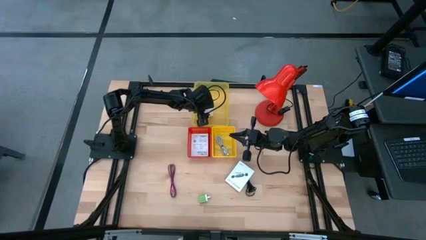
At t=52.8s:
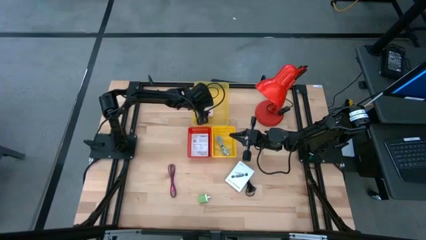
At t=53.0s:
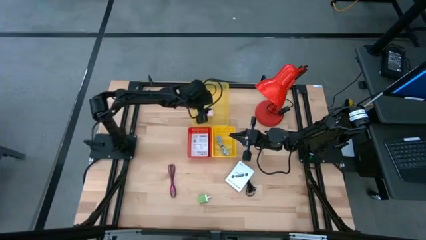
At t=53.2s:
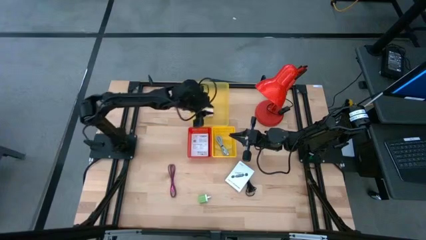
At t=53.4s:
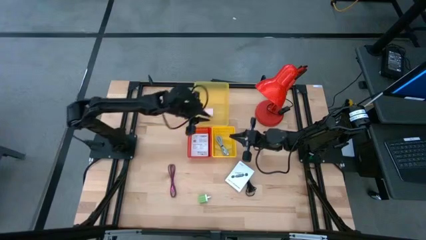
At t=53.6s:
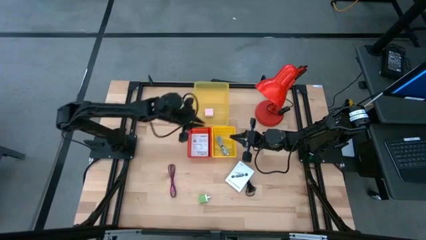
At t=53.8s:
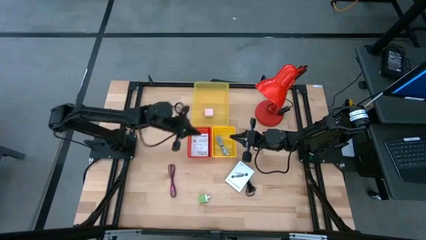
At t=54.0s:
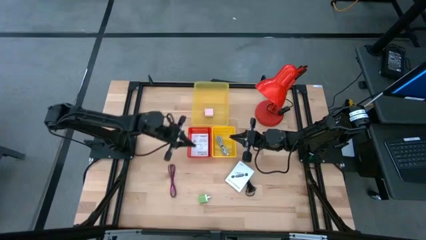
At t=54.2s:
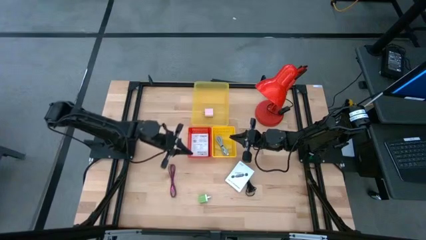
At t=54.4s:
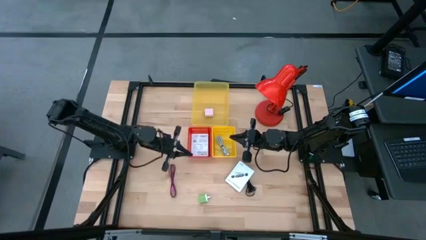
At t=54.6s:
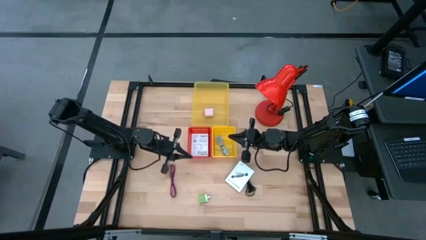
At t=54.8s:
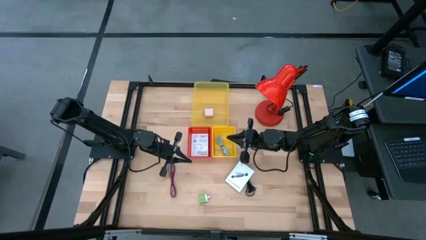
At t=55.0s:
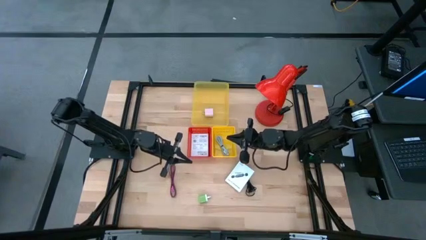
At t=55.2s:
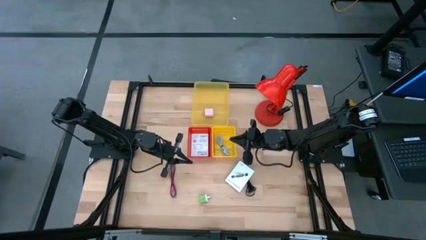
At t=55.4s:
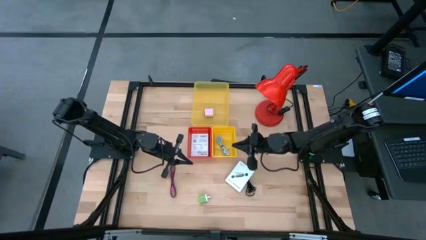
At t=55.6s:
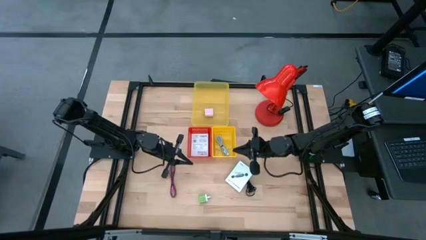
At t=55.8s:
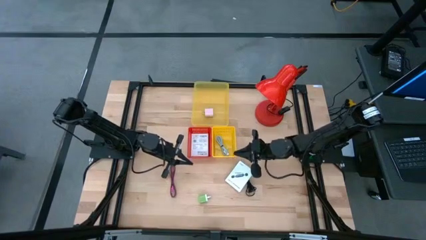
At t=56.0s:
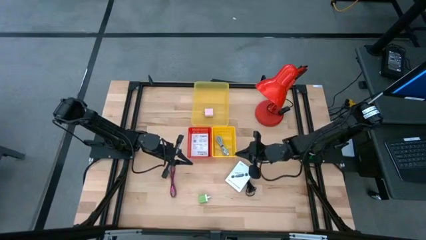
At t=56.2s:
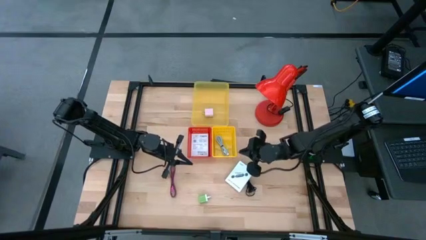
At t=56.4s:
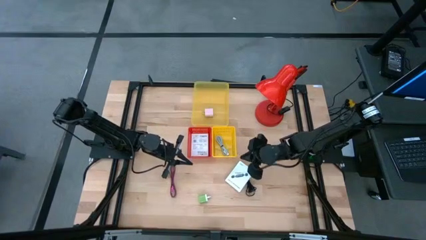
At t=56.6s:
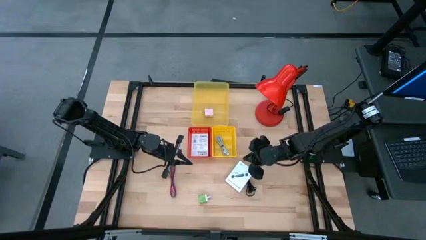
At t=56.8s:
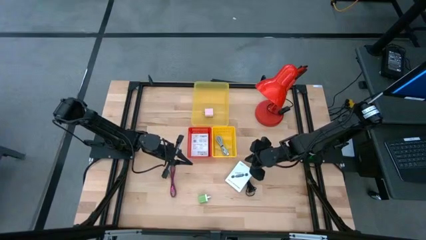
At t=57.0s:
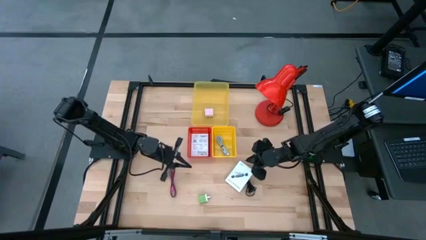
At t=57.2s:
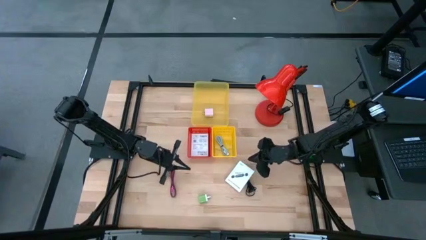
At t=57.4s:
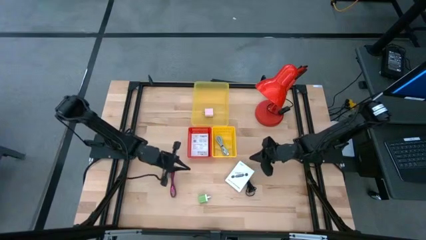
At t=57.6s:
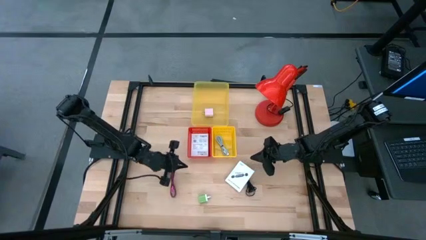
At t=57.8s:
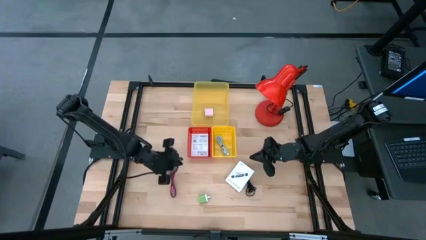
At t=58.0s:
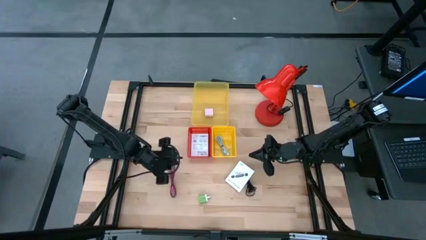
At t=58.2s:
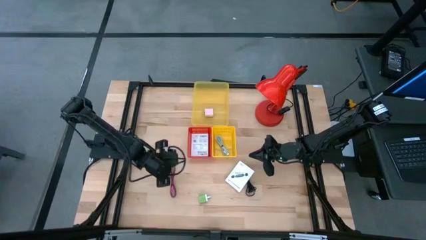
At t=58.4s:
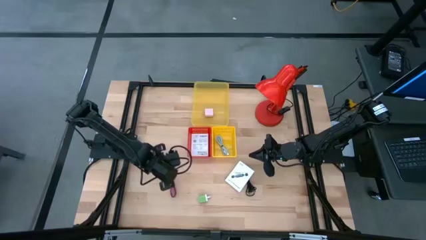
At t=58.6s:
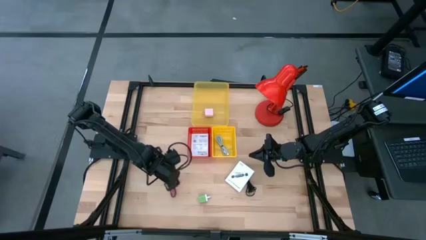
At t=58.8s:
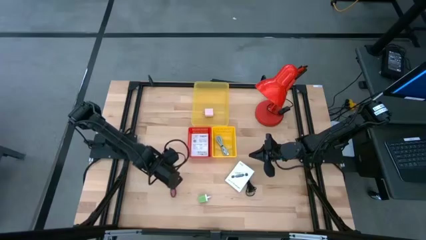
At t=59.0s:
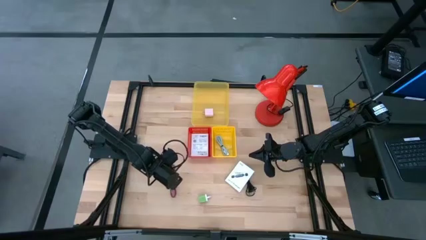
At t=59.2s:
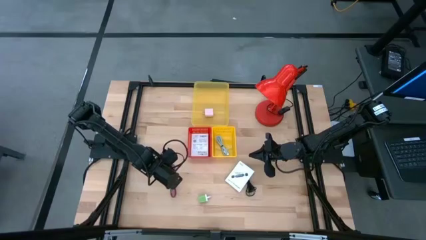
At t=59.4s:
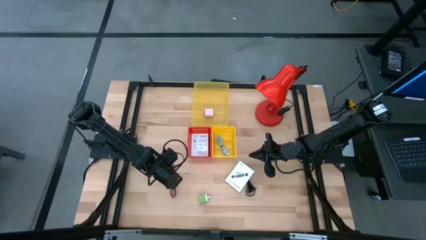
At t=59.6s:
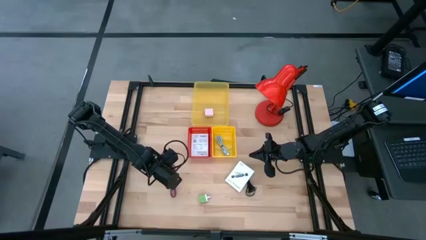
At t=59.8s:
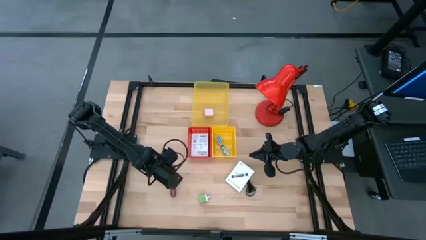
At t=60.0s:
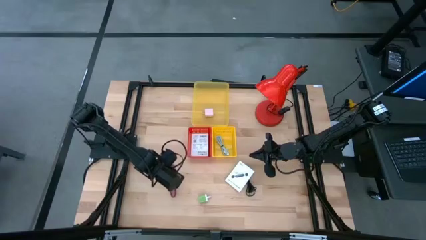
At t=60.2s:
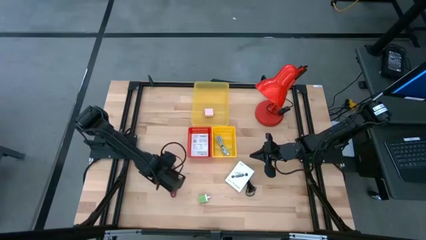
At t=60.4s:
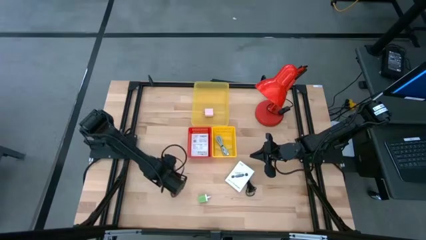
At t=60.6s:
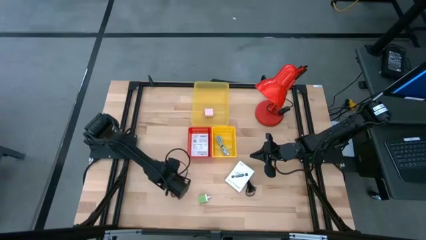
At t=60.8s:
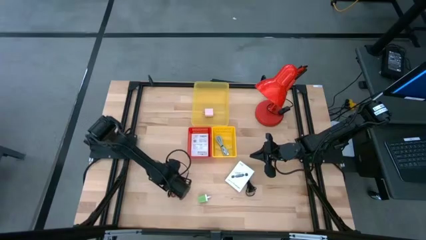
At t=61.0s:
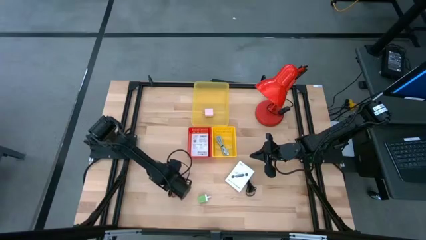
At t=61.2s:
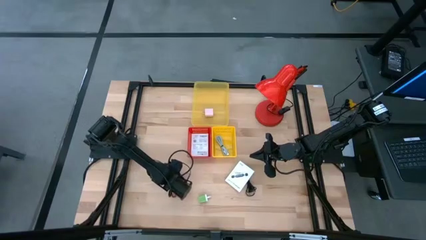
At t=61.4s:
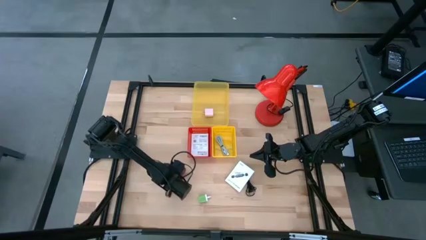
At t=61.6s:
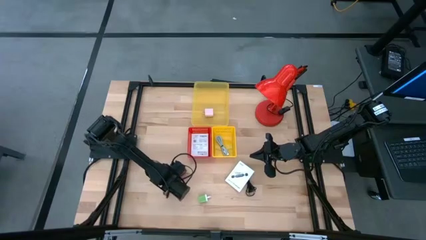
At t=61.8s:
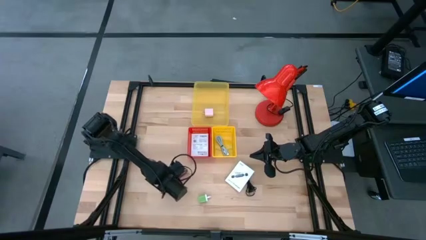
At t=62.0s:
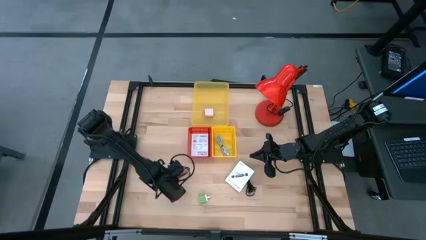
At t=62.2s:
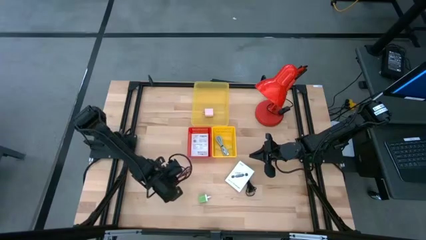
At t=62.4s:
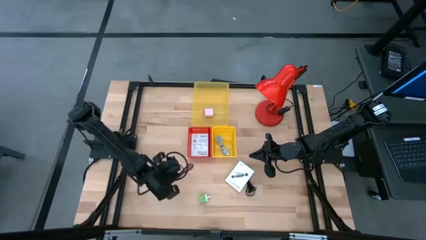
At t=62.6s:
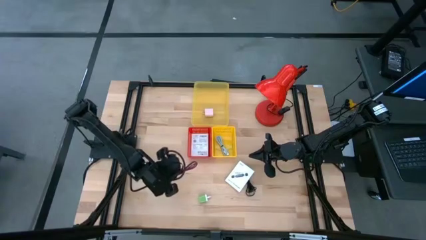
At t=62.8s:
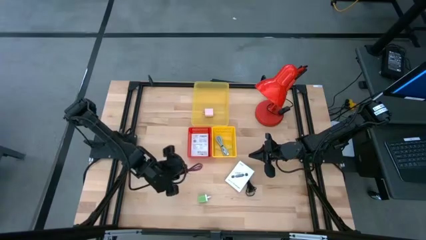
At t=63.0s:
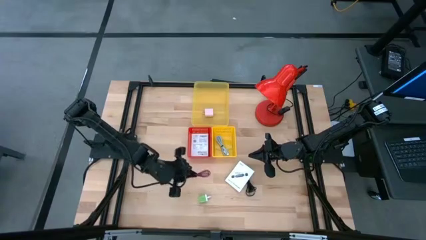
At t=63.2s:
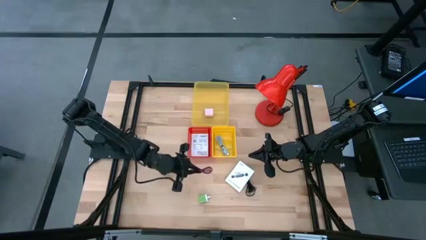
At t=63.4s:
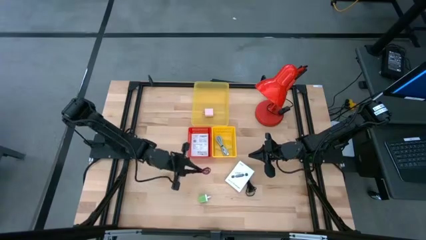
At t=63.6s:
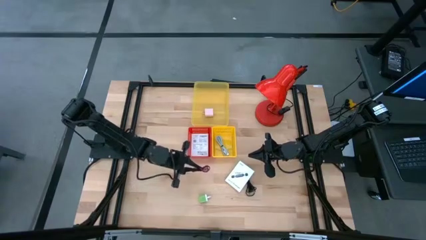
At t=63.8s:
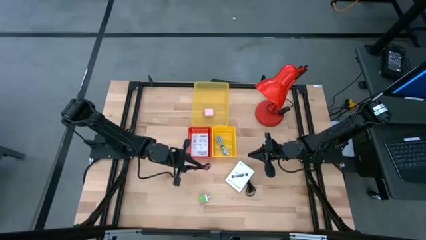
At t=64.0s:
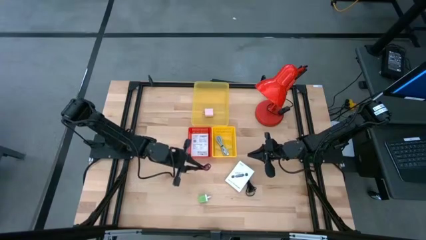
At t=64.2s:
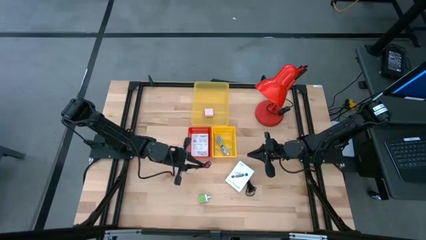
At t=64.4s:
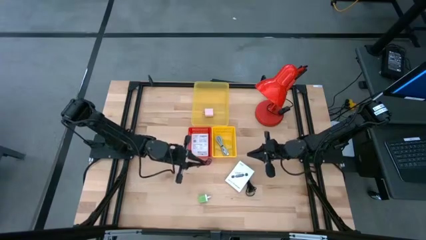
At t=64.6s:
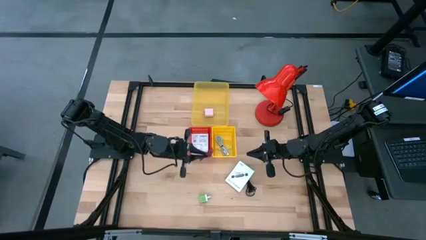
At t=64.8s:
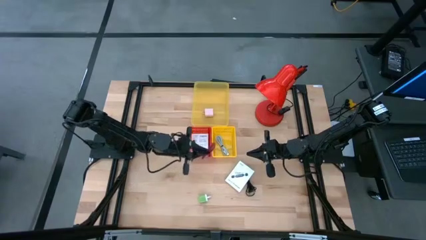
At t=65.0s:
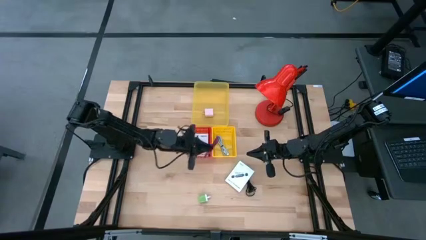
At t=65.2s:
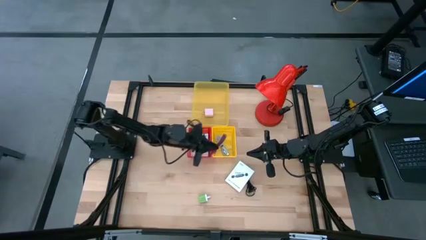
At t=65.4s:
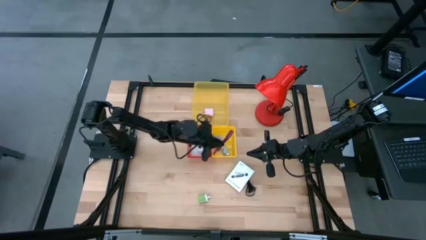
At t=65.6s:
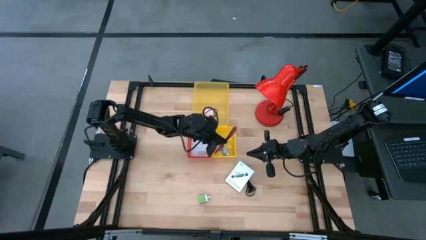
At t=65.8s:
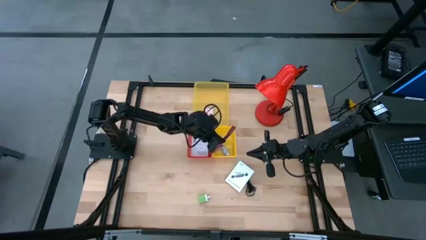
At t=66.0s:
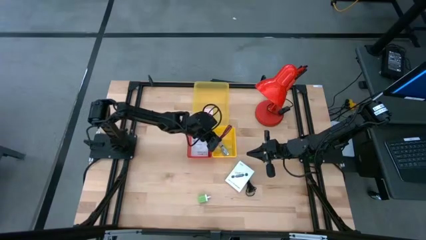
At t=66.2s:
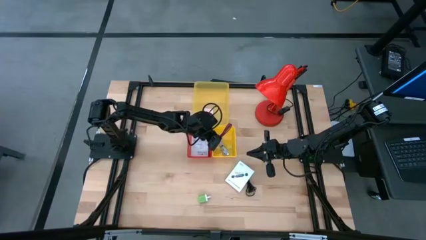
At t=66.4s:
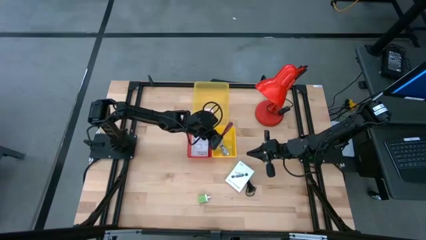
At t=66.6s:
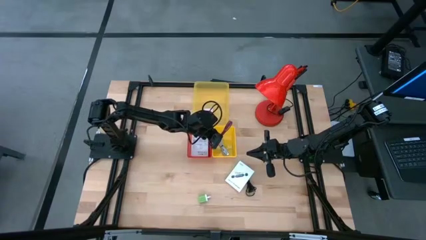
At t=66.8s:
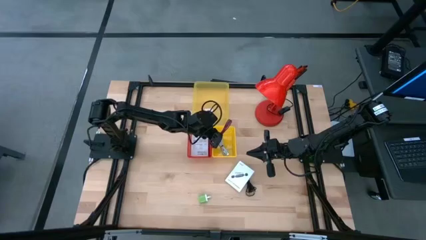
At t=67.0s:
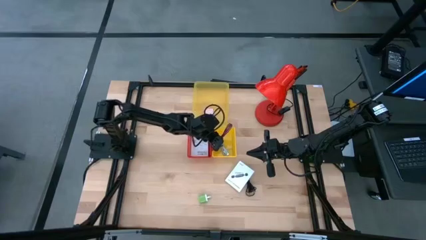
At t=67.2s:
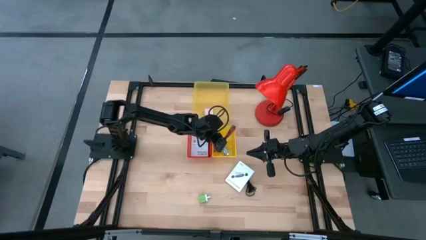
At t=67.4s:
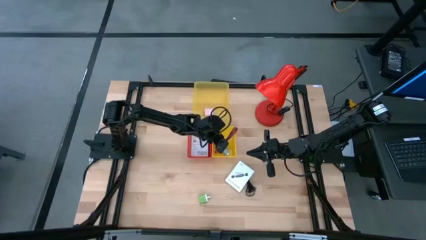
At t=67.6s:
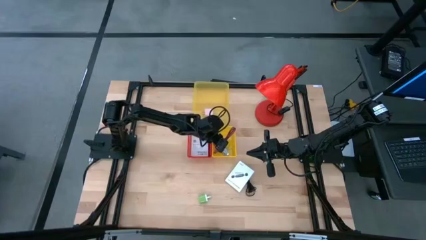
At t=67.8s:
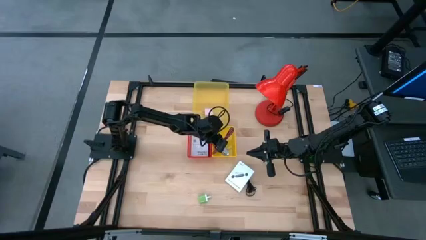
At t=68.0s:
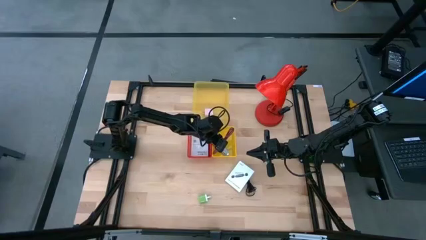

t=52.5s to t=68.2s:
Task: Pick and place items into bin
Put the pink charger cable into the yellow bin
